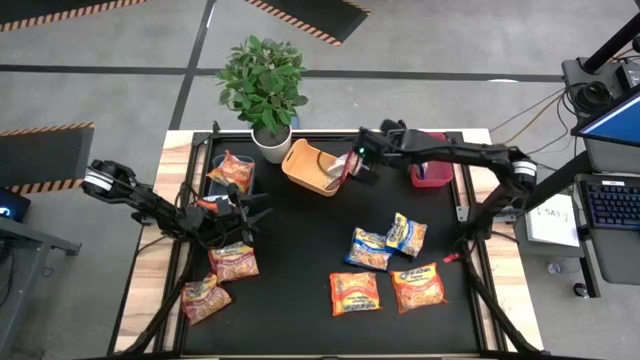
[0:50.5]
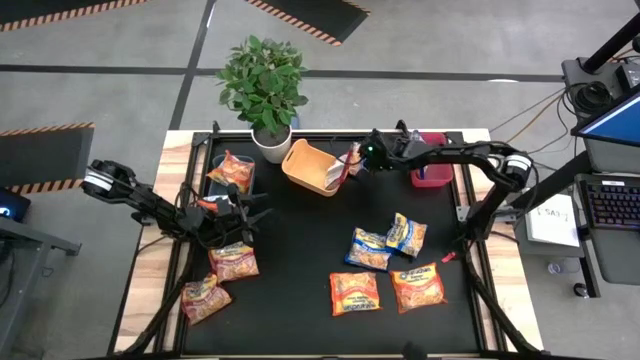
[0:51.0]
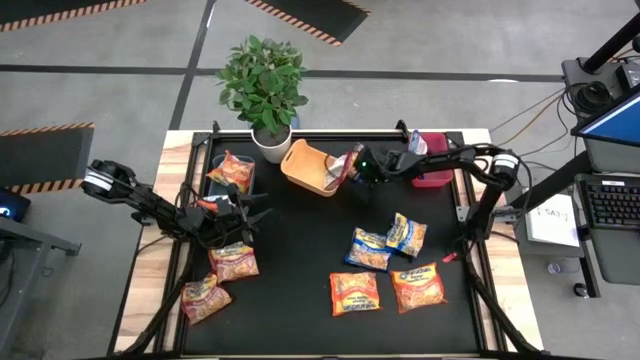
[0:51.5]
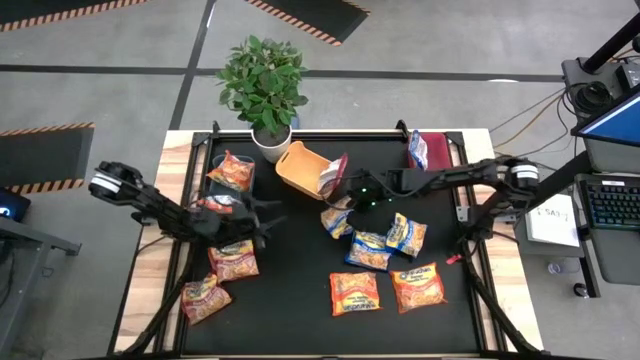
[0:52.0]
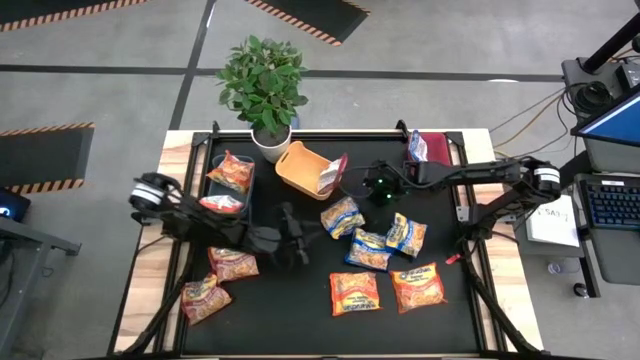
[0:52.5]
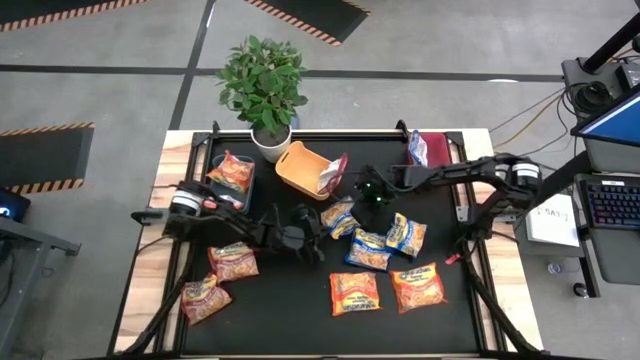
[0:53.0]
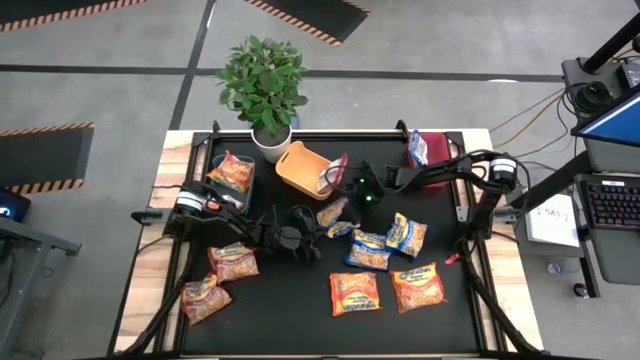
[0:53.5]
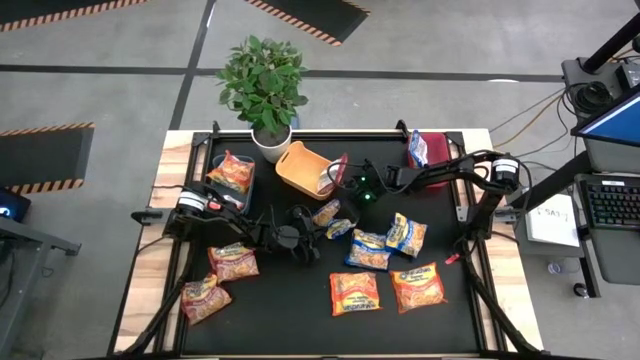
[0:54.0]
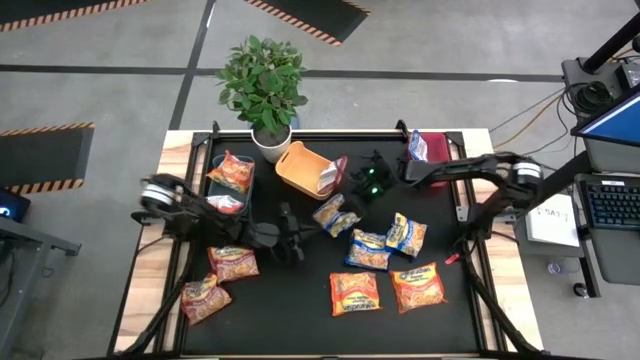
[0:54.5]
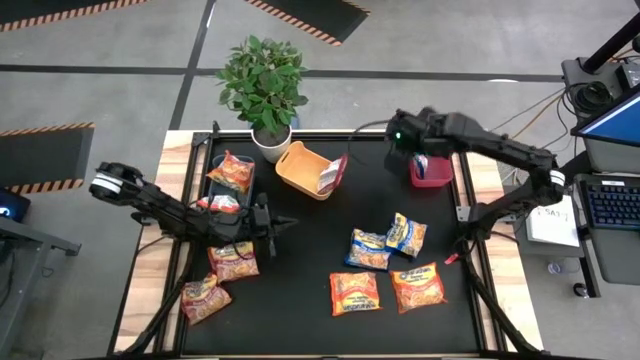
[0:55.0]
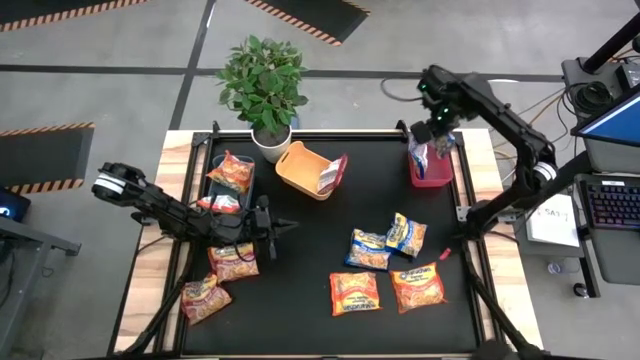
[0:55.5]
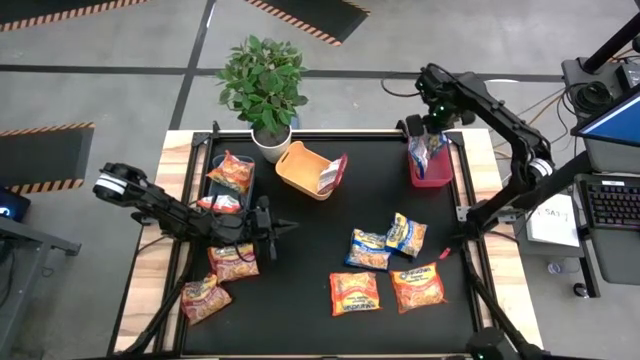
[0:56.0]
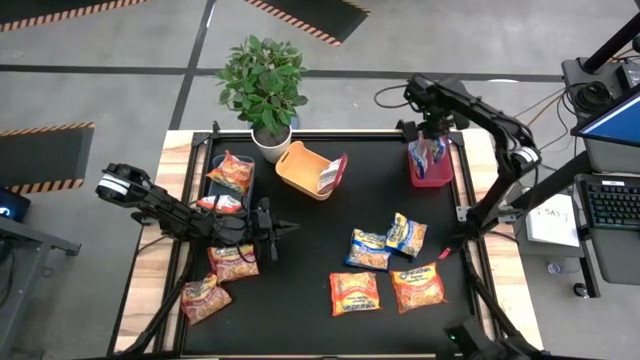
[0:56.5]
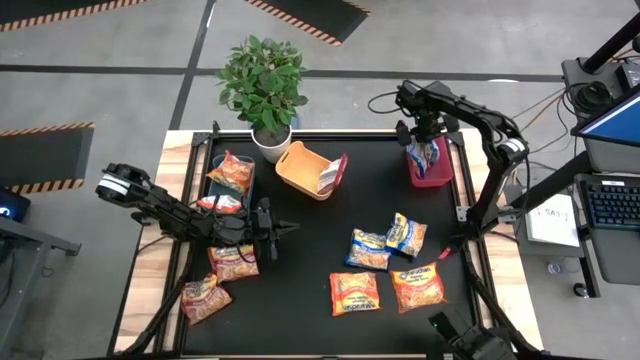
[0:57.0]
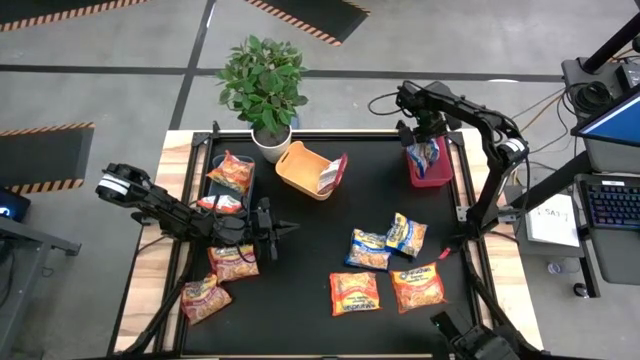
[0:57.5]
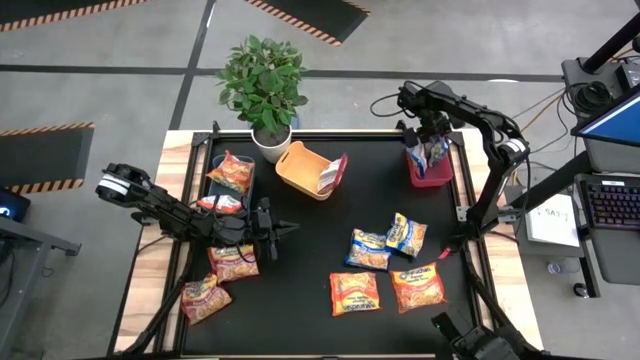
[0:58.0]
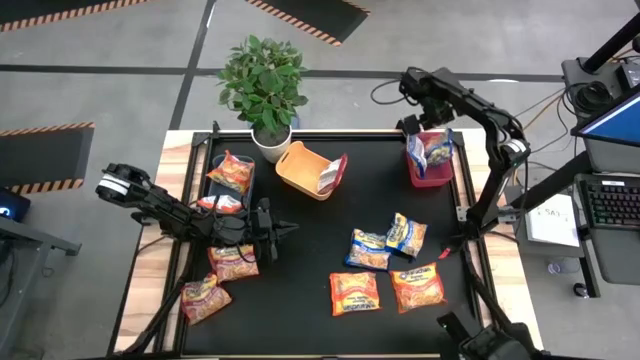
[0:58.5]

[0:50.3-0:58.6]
Task: Sort Maruchan noodles
Put the blue noodle pack into the red bin

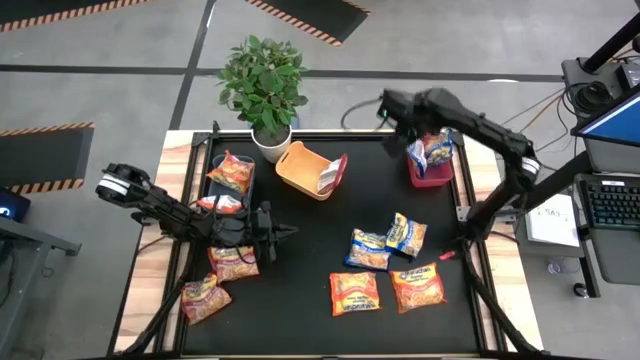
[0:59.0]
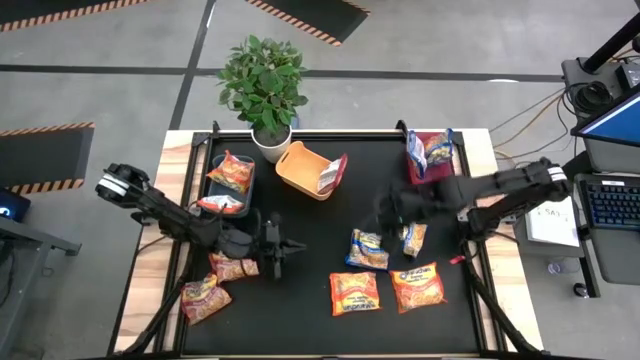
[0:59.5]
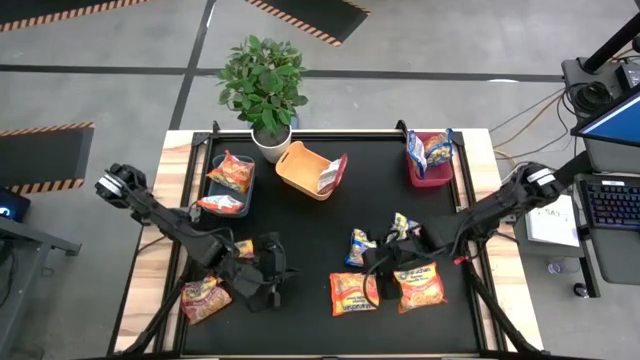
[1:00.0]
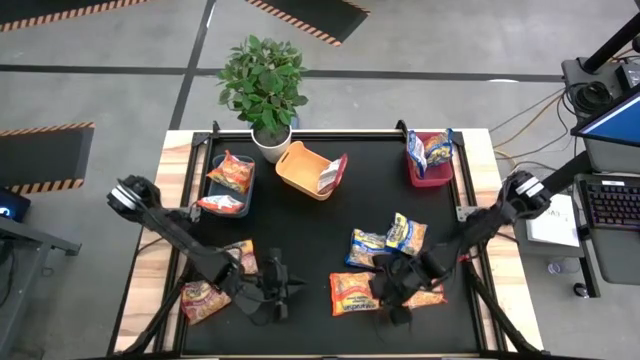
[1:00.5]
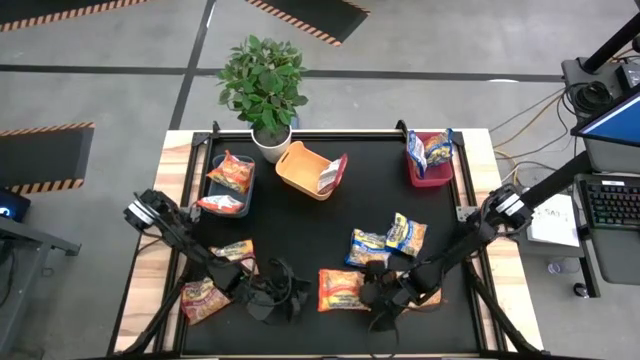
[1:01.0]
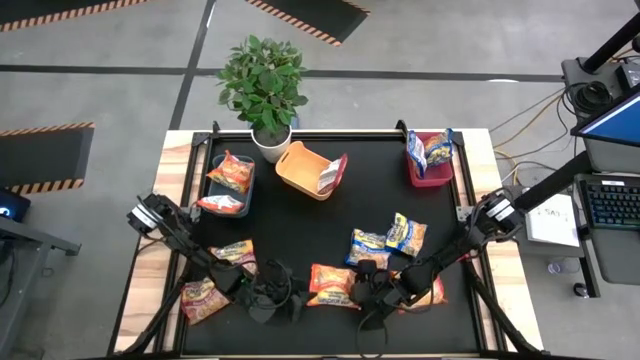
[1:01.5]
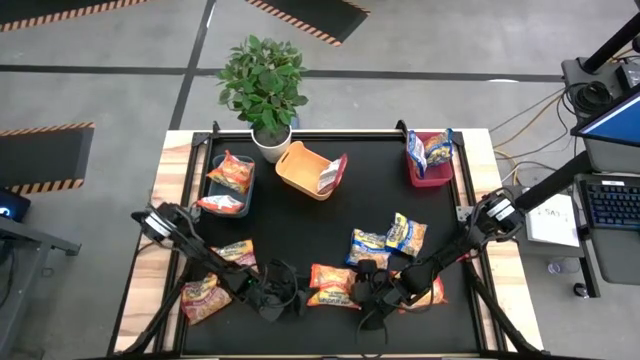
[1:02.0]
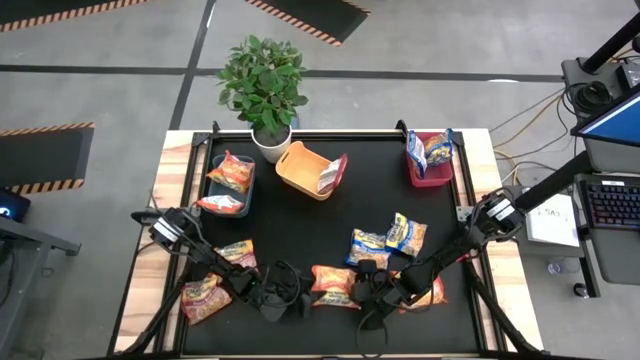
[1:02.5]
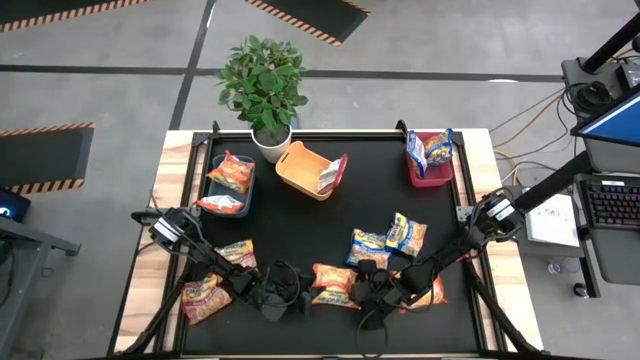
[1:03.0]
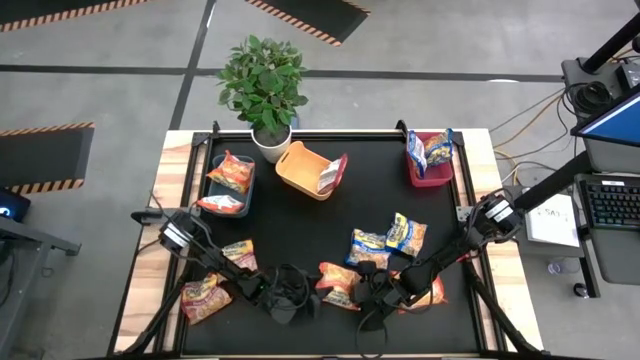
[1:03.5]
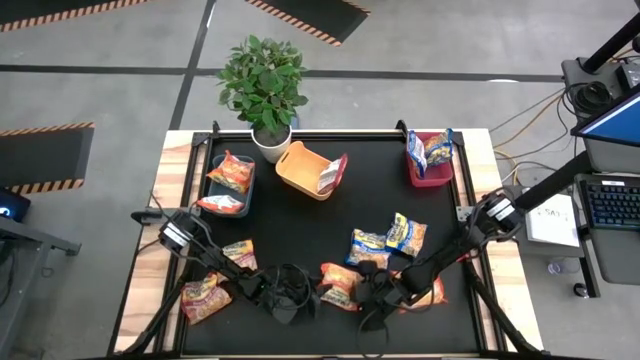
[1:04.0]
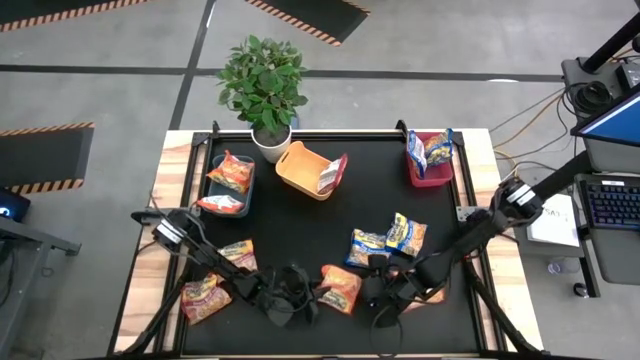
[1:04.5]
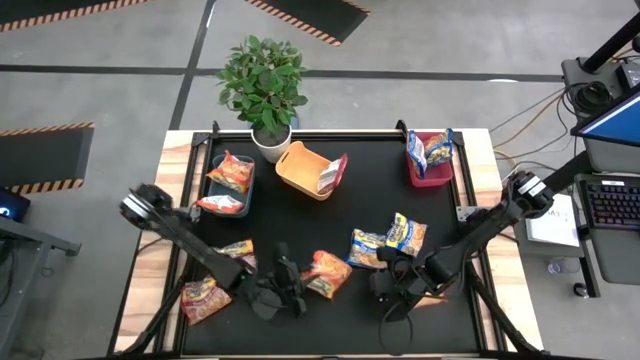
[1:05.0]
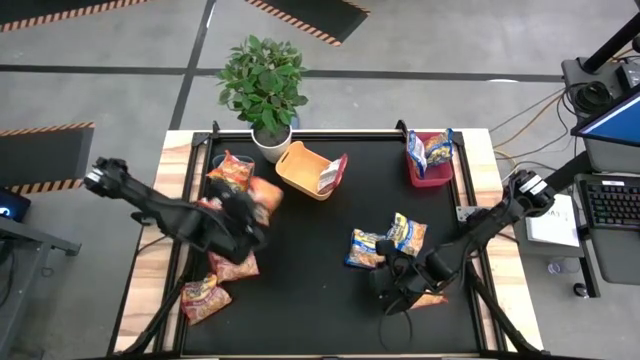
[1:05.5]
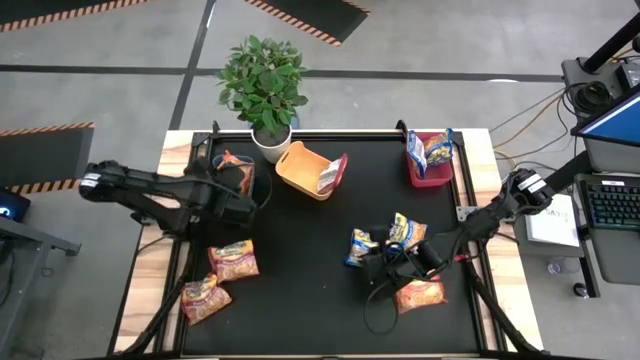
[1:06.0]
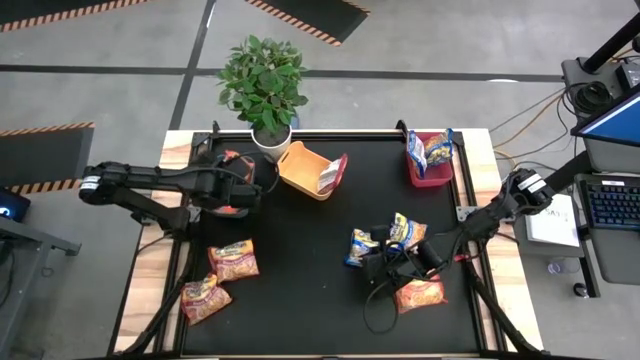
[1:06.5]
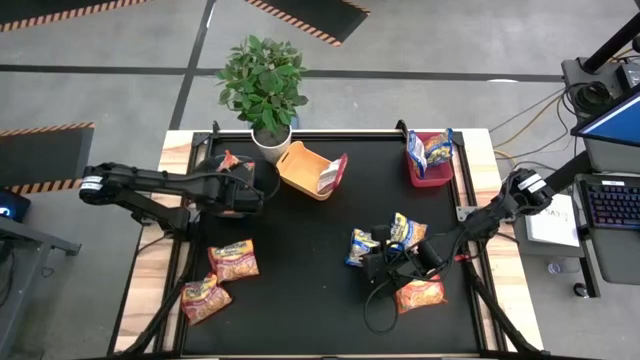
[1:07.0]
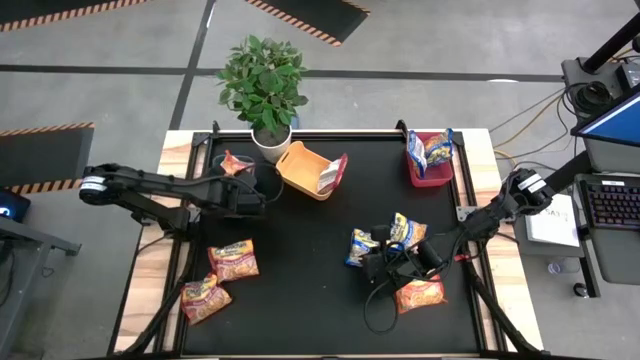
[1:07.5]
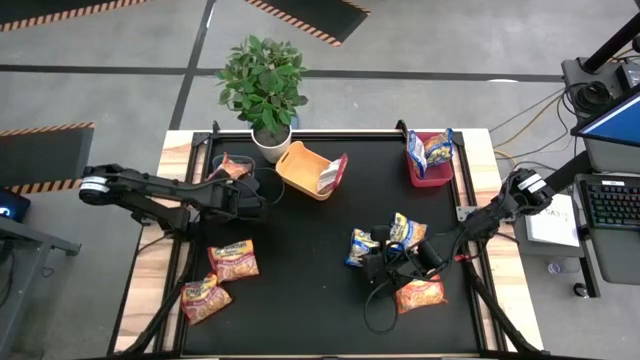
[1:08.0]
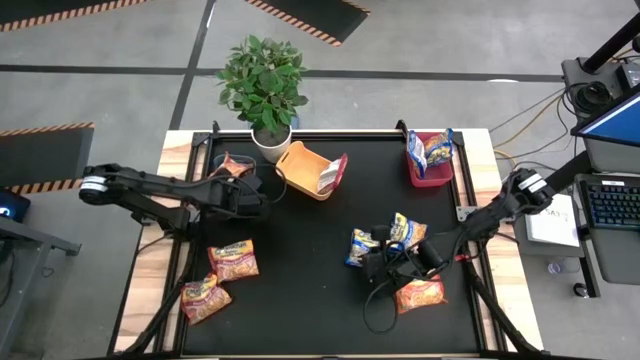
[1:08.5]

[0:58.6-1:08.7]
Put the orange noodle pack into the blue bin

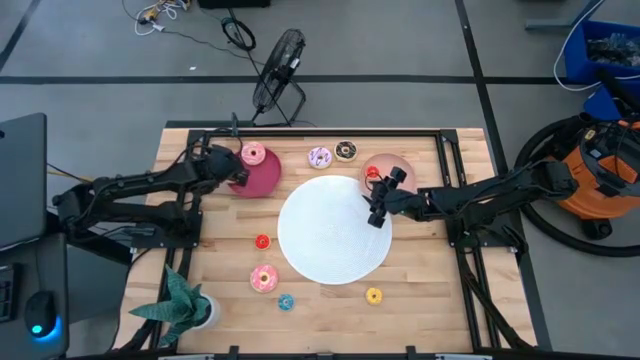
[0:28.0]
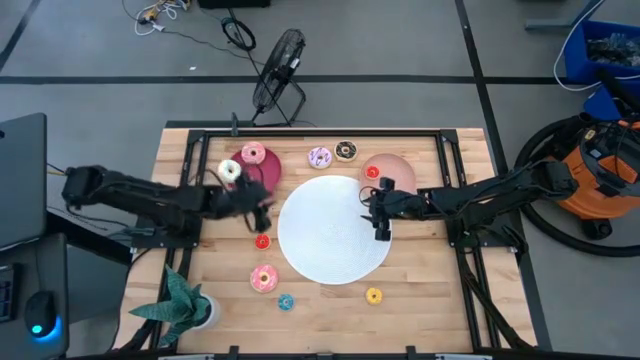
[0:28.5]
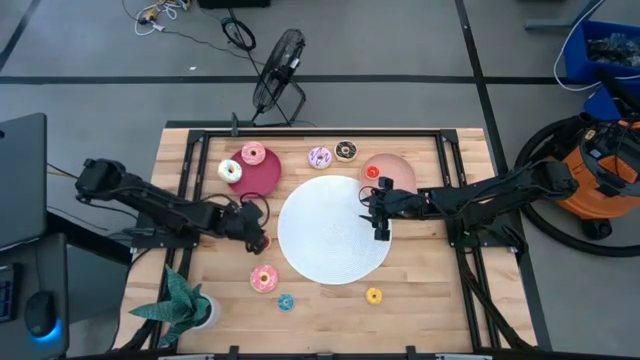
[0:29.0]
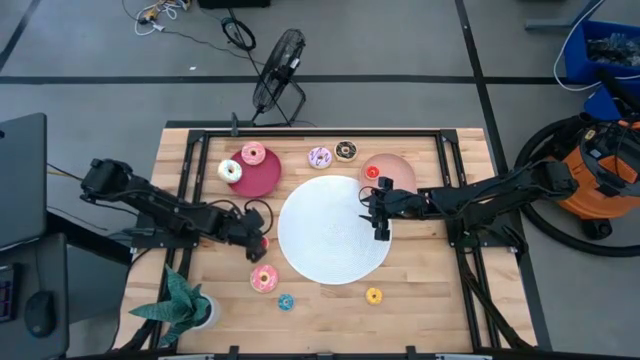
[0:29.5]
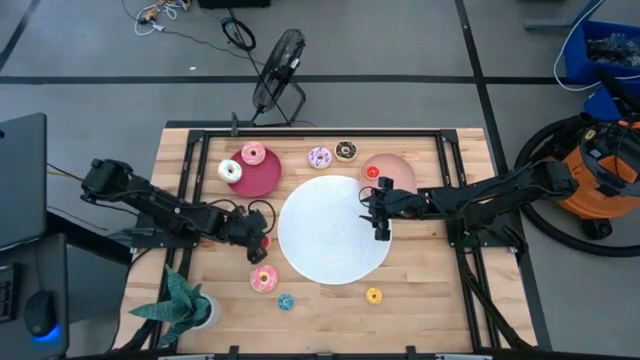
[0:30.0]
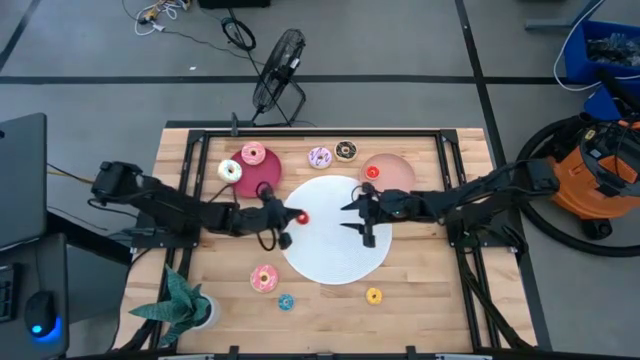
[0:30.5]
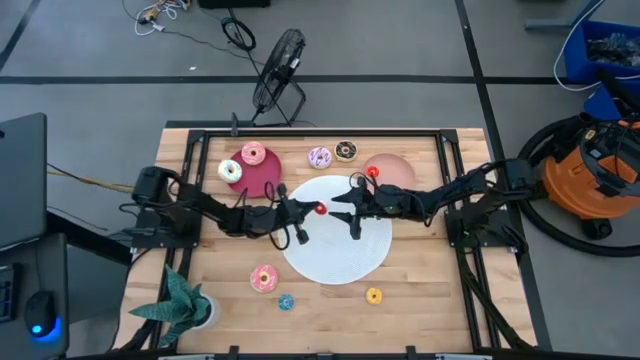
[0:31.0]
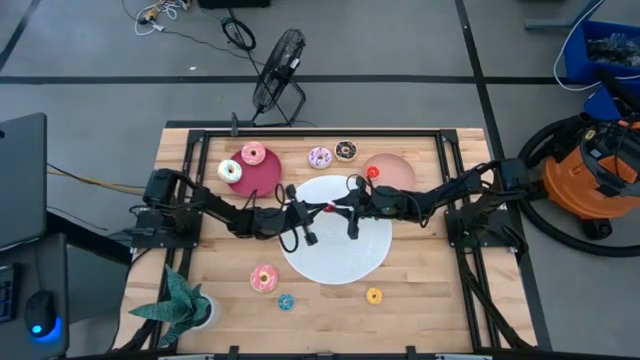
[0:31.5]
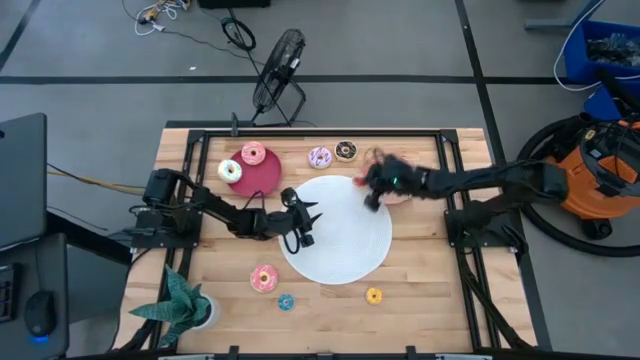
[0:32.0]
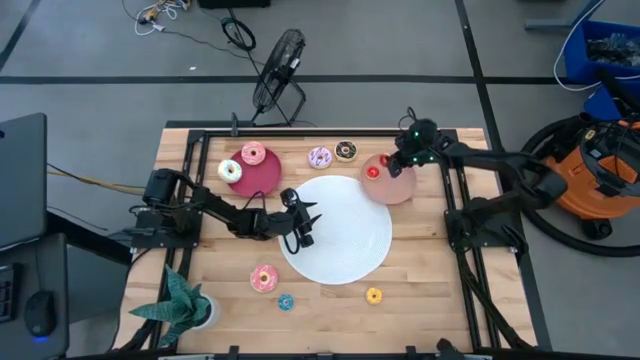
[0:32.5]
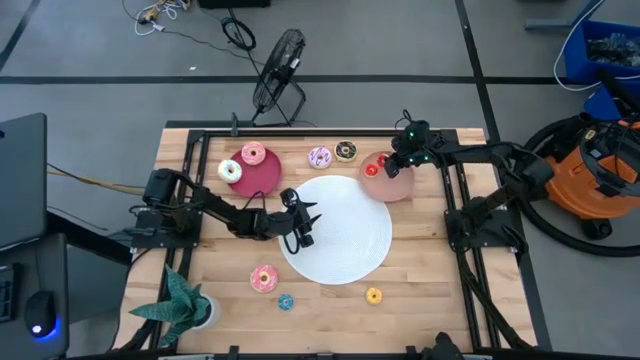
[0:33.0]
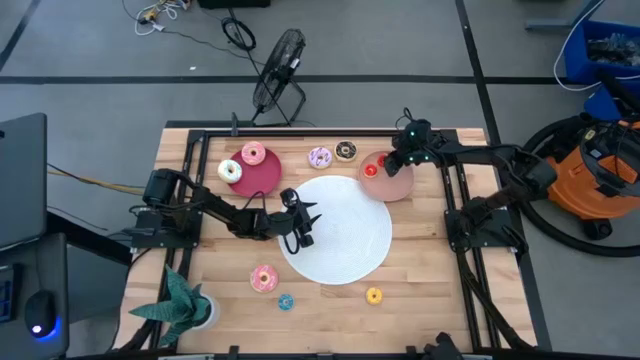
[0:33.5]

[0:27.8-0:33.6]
Task: Pick & Place donuts
Put the small red donut on the light pink plate
